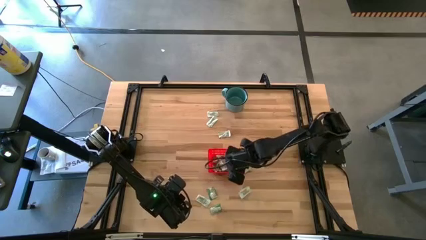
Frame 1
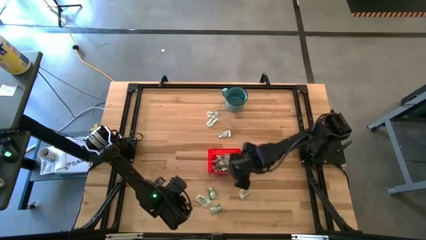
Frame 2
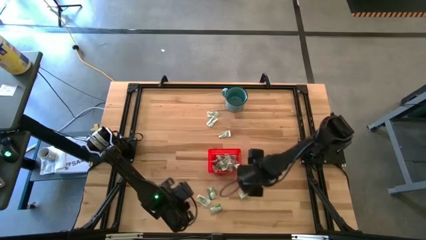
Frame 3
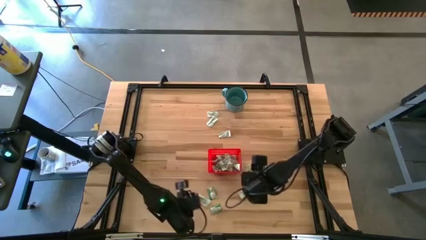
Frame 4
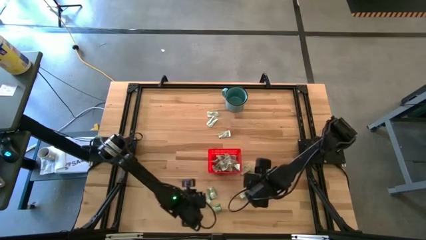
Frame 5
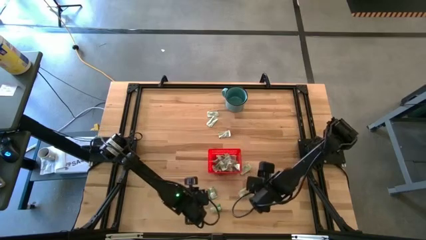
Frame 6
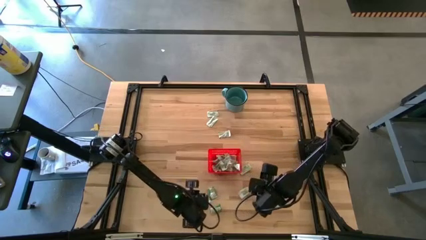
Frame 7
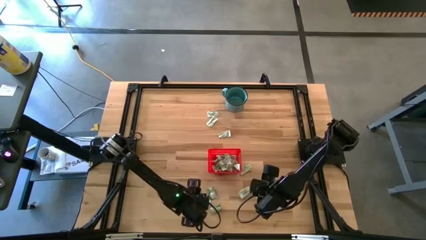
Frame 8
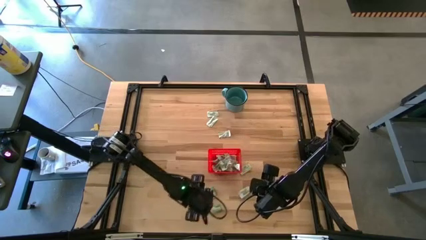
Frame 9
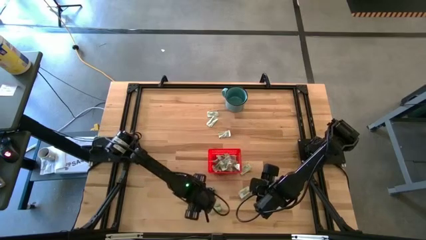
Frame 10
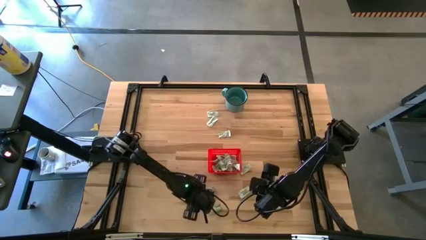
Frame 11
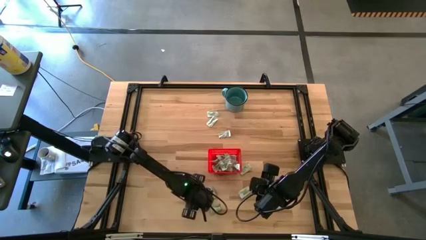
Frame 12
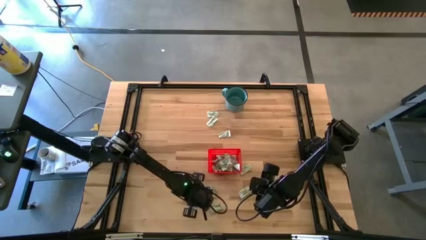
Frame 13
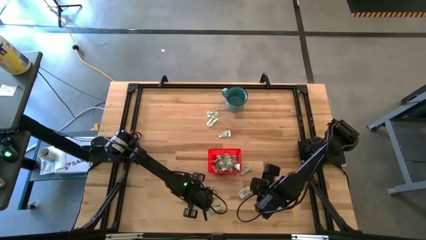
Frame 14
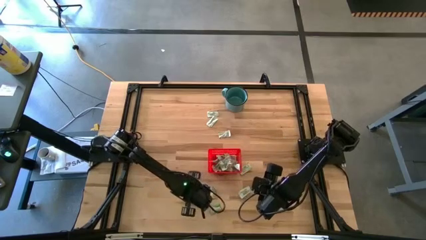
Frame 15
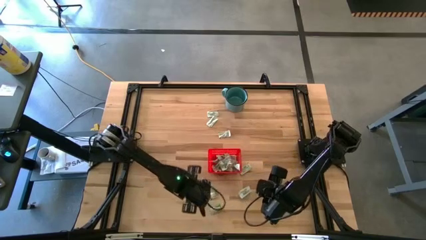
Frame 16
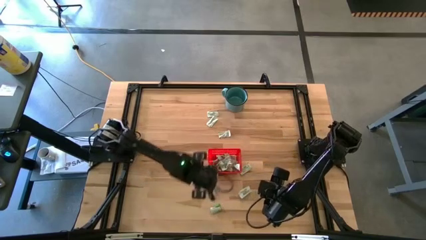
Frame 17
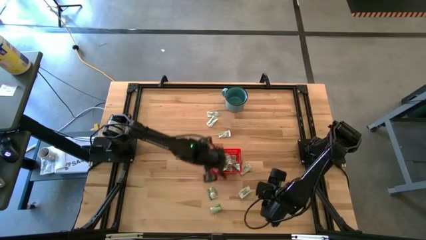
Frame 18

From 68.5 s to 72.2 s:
Task: Pick and place Stevia / Truvia into bins
Put the green stevia packet into the red bin

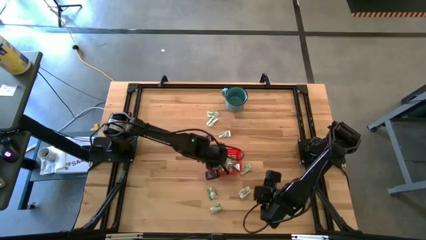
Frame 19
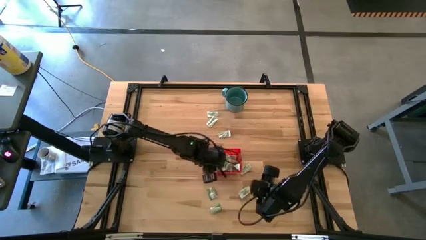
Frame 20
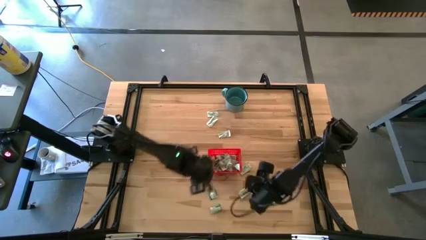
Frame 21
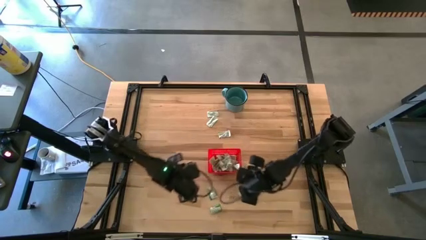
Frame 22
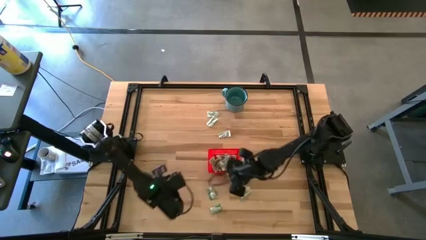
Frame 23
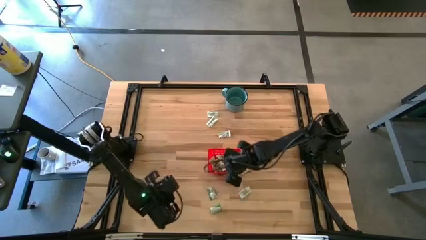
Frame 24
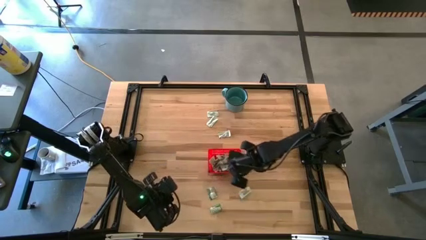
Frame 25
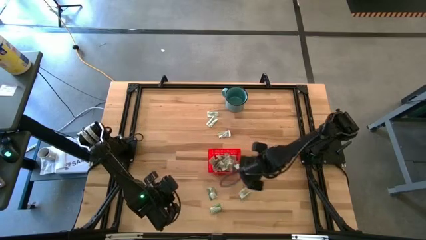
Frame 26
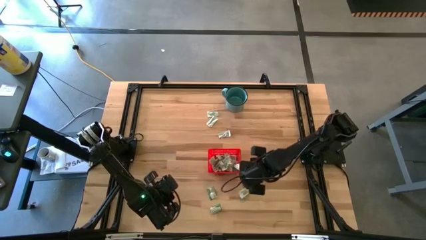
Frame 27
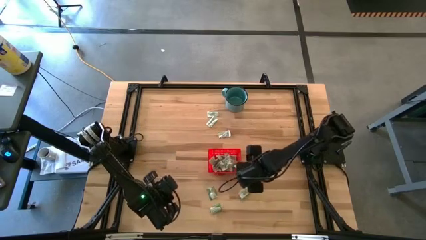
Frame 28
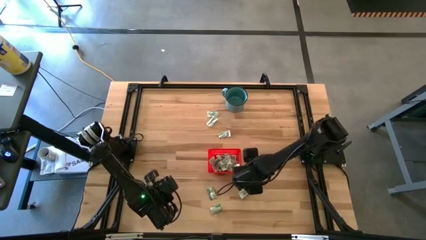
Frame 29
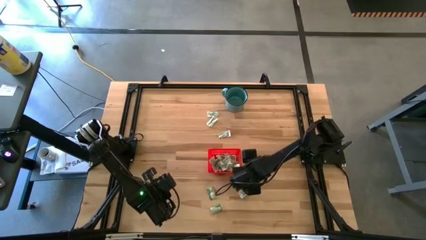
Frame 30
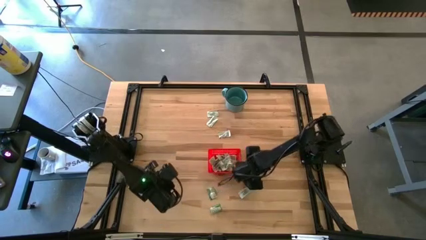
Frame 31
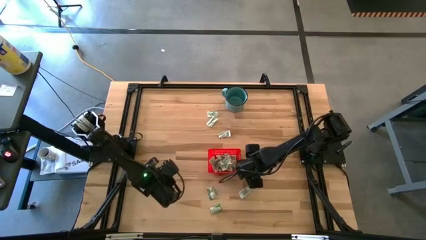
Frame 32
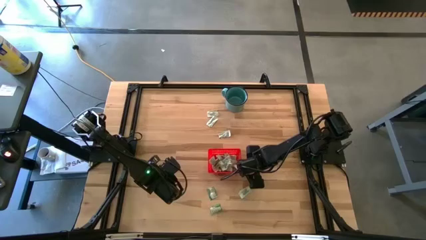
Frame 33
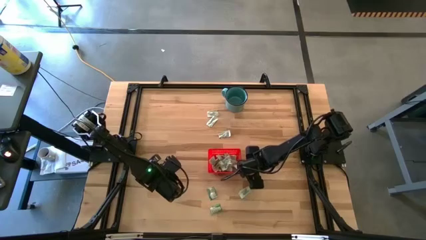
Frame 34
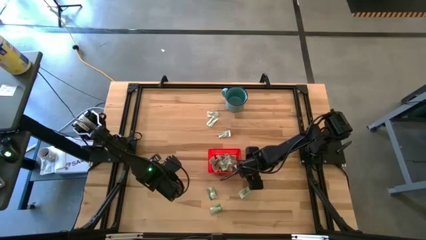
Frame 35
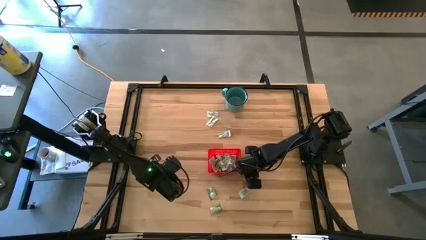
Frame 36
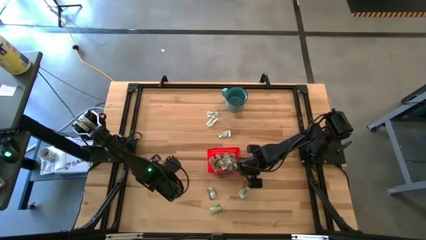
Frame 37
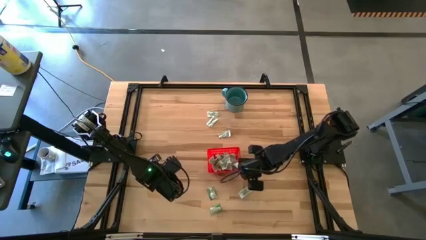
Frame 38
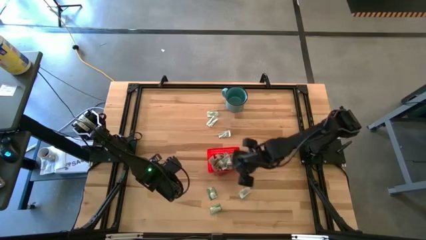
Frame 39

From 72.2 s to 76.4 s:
Put the green stevia packet into the red bin

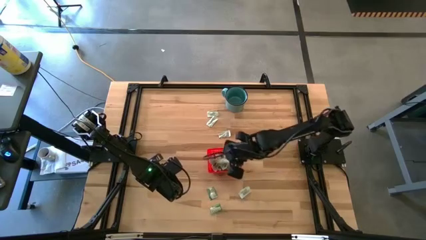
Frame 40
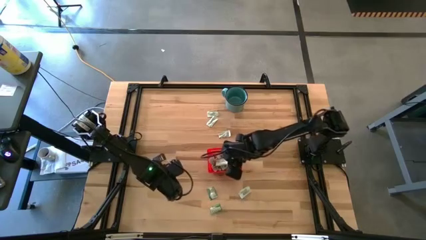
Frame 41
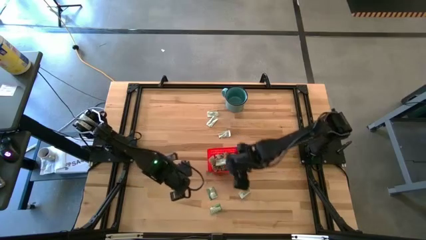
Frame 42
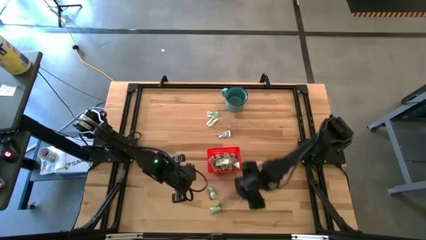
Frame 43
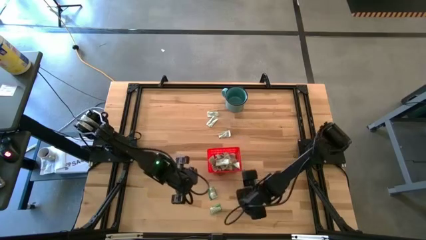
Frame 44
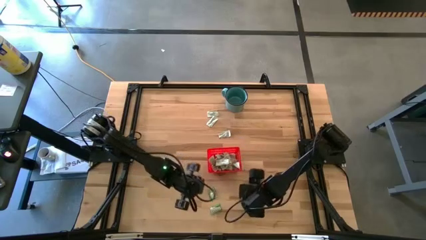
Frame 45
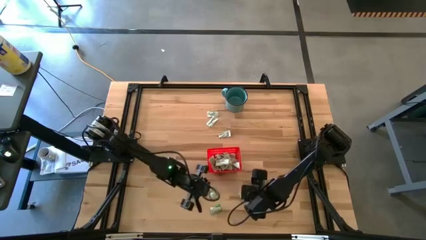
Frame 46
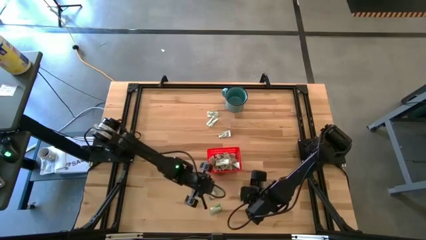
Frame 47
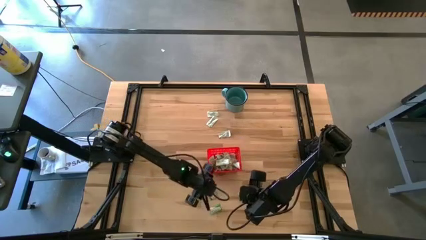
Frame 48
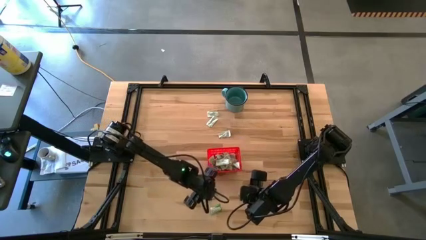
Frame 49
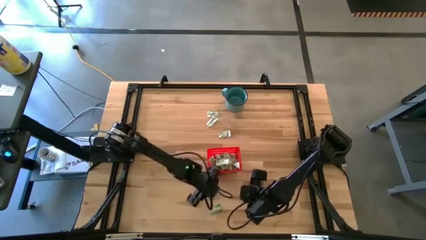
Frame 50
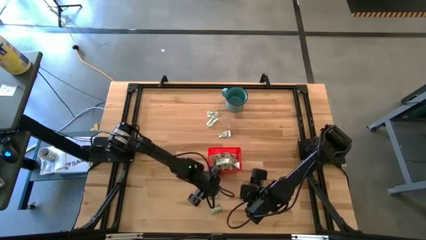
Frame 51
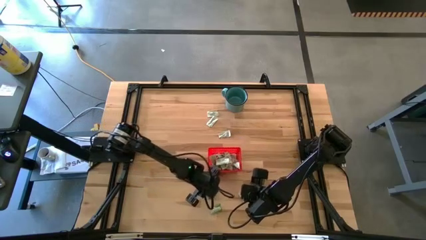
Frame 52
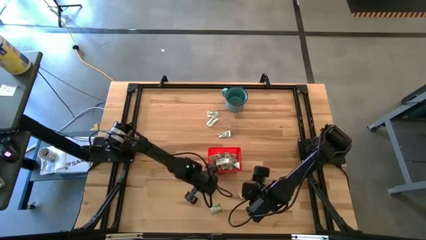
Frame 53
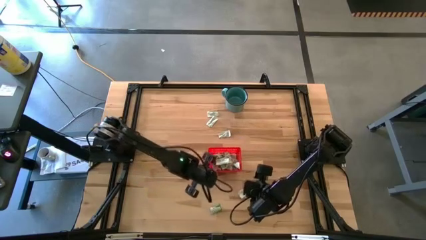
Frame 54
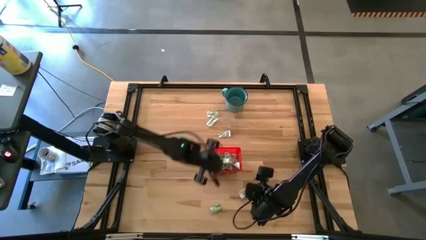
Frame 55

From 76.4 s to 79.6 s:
Put the green truvia packet into the red bin

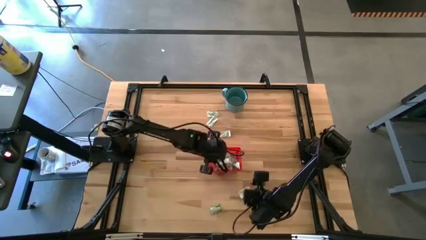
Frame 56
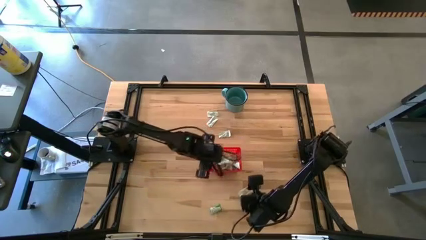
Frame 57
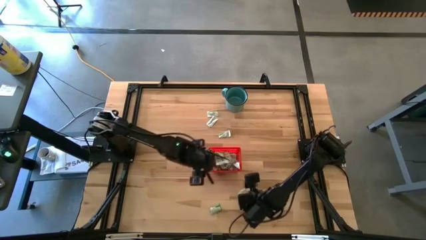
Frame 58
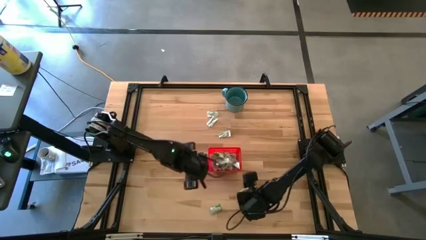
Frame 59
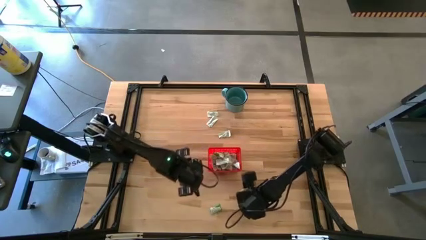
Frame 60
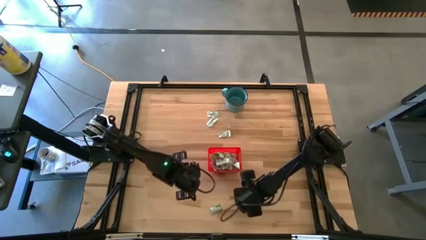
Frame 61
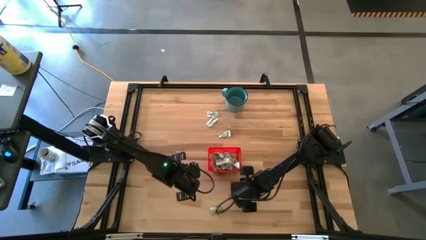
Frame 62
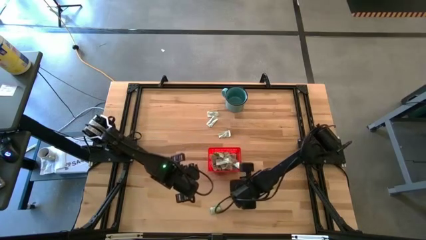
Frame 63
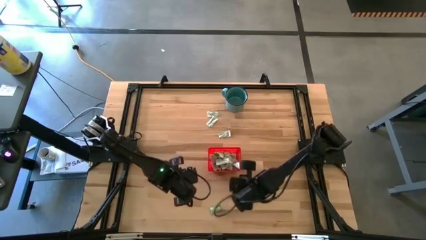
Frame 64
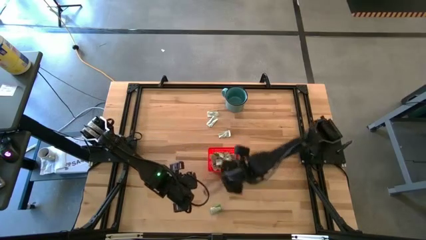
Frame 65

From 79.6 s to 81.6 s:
Put the green stevia packet into the red bin

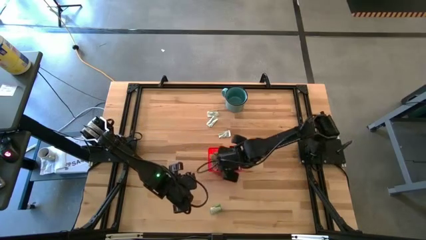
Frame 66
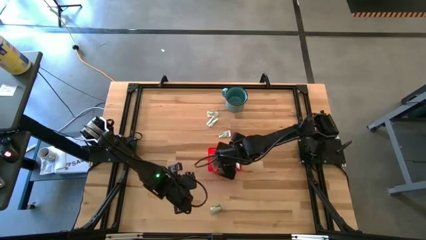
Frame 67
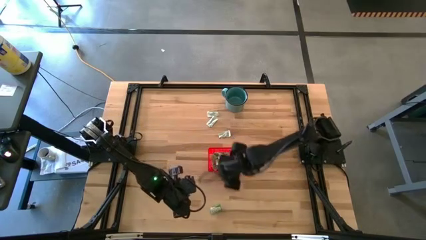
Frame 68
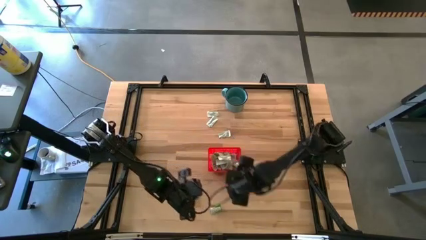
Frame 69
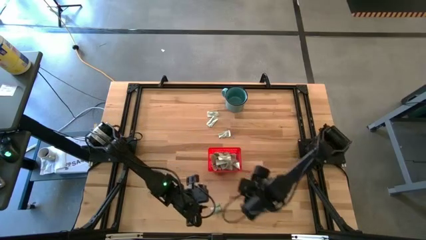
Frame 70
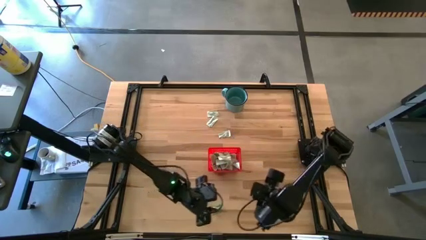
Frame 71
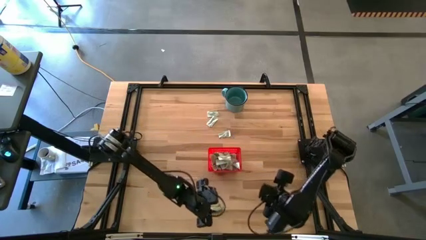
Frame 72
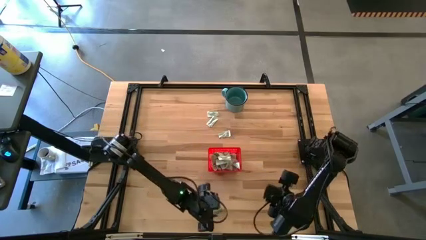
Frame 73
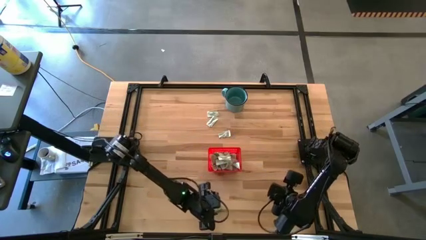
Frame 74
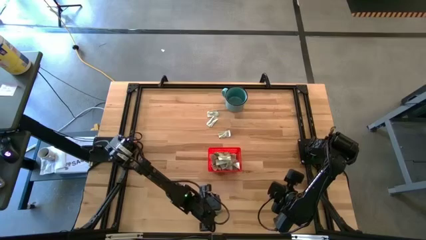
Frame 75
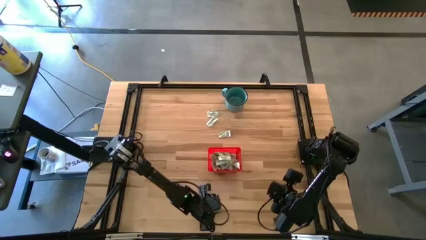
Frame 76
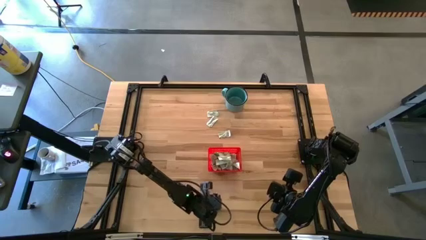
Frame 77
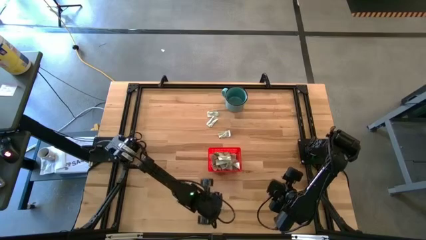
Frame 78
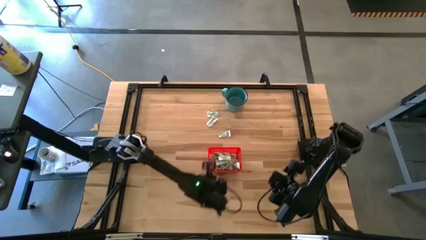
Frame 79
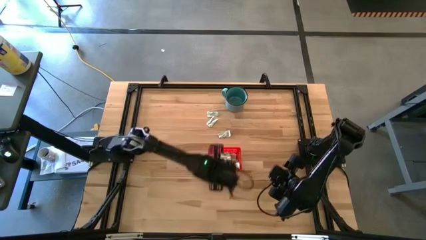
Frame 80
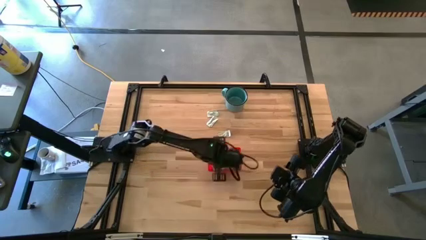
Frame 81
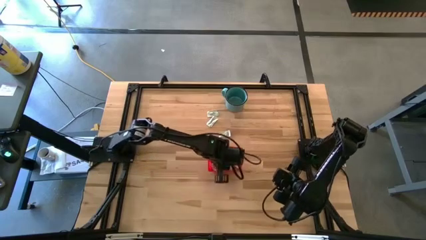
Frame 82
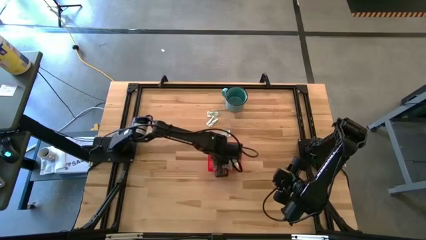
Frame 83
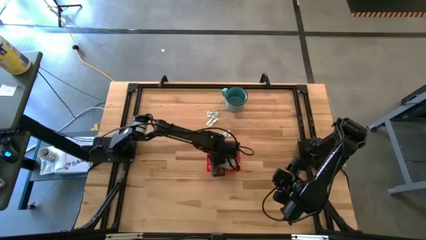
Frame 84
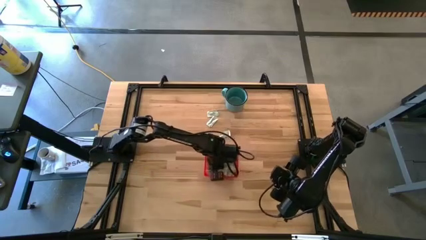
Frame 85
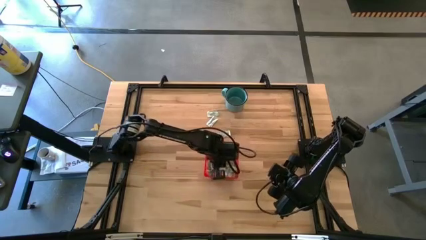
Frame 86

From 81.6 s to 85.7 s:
Put the green truvia packet into the red bin
